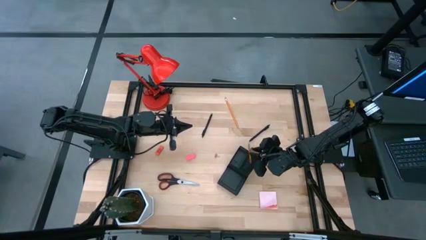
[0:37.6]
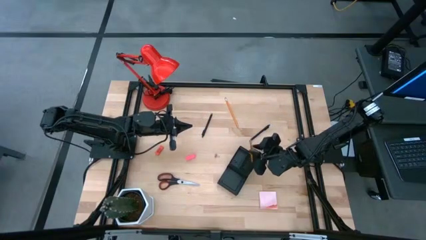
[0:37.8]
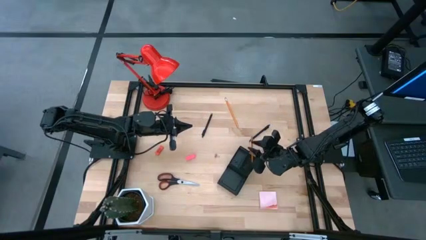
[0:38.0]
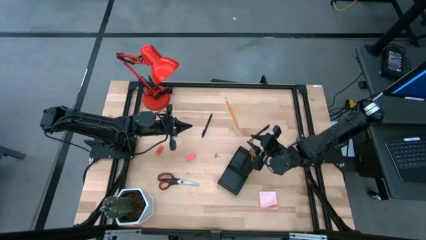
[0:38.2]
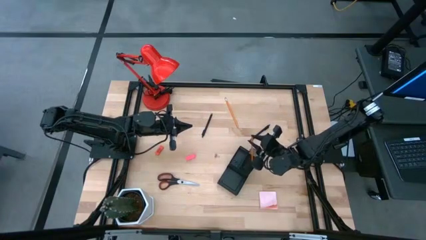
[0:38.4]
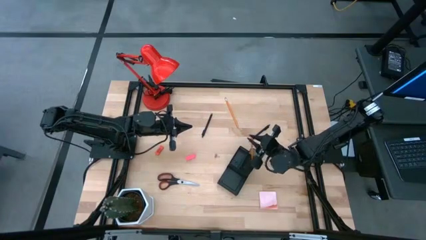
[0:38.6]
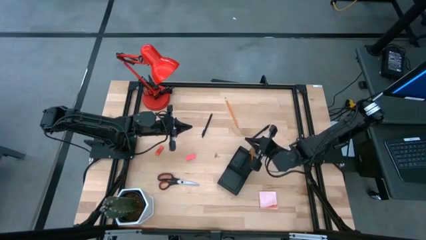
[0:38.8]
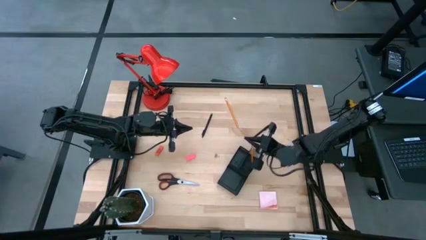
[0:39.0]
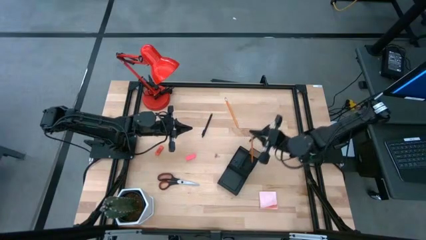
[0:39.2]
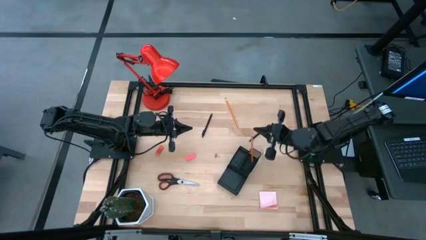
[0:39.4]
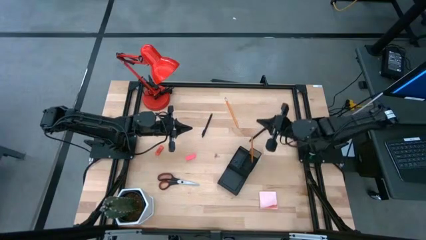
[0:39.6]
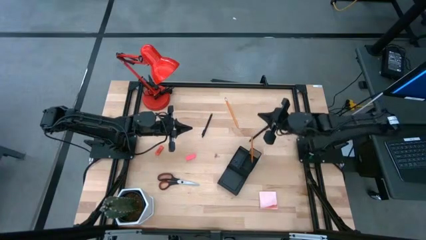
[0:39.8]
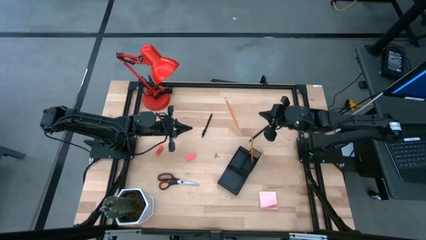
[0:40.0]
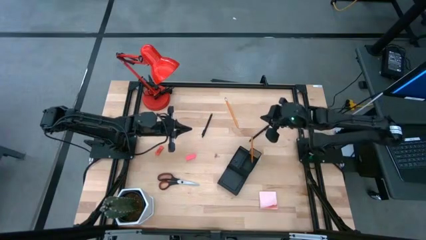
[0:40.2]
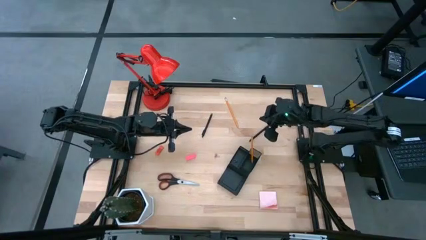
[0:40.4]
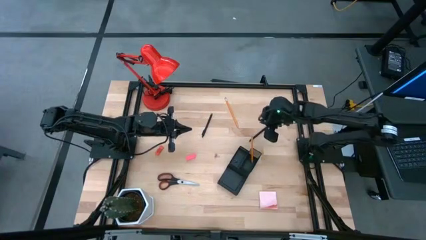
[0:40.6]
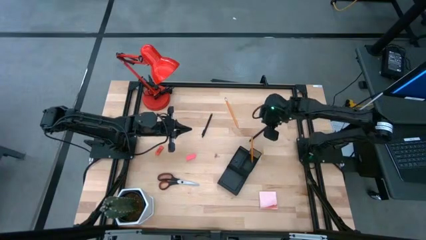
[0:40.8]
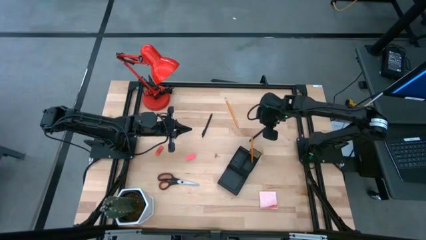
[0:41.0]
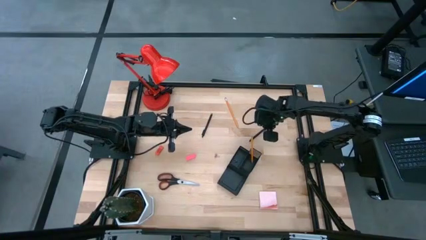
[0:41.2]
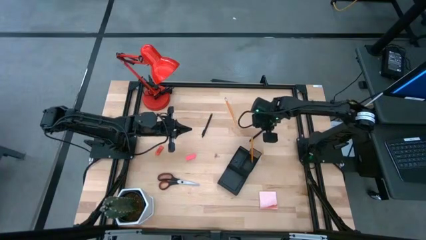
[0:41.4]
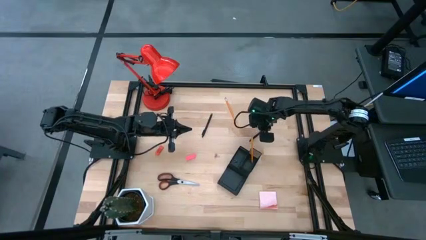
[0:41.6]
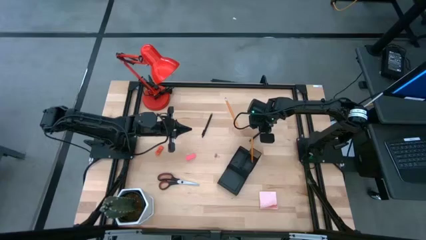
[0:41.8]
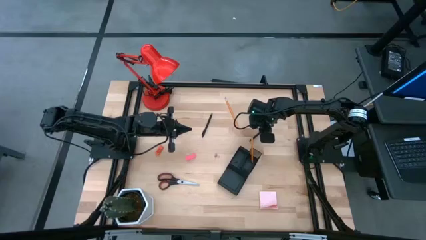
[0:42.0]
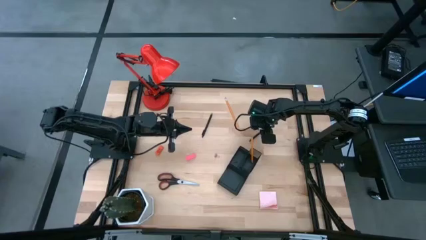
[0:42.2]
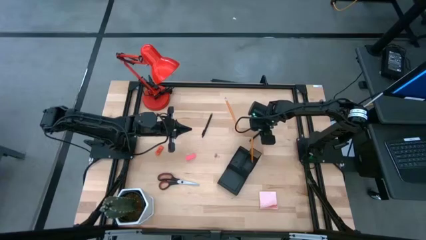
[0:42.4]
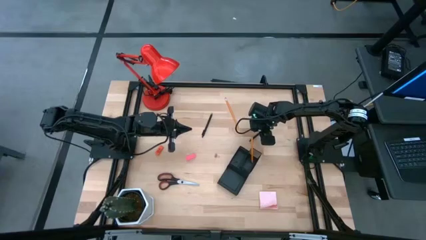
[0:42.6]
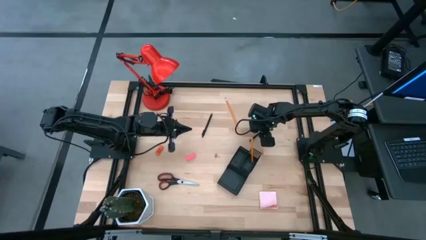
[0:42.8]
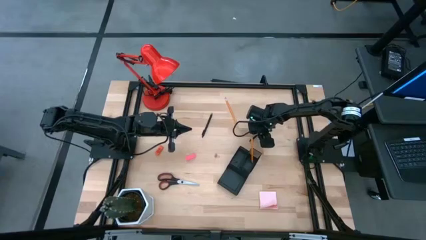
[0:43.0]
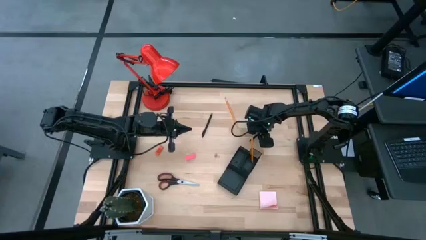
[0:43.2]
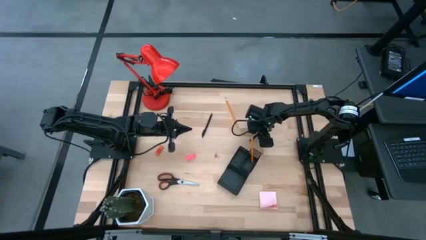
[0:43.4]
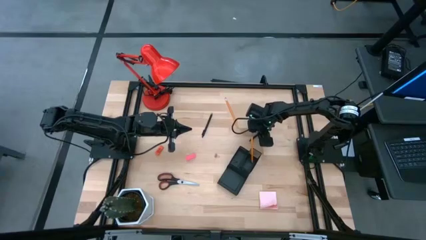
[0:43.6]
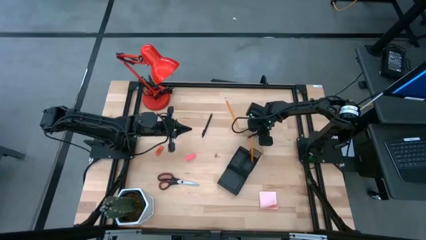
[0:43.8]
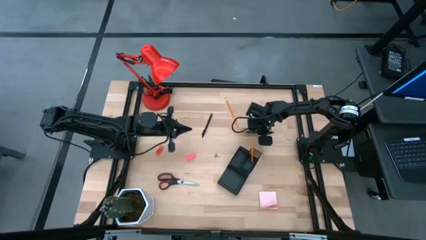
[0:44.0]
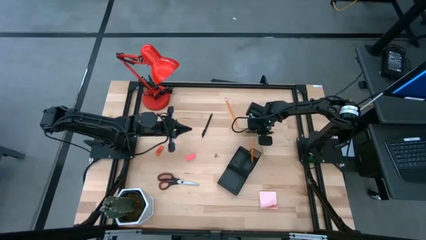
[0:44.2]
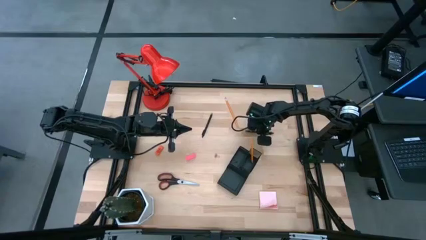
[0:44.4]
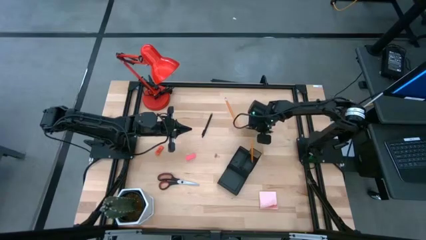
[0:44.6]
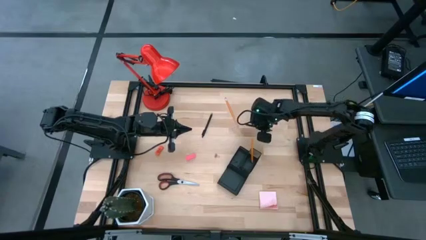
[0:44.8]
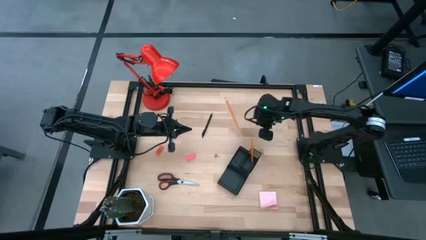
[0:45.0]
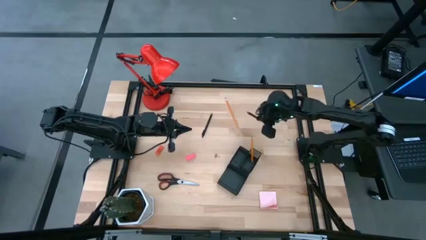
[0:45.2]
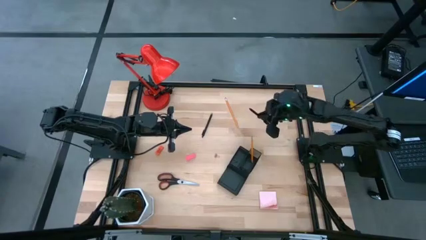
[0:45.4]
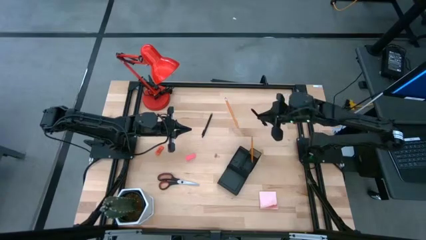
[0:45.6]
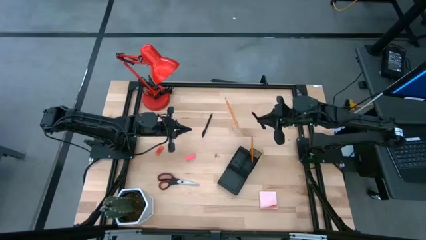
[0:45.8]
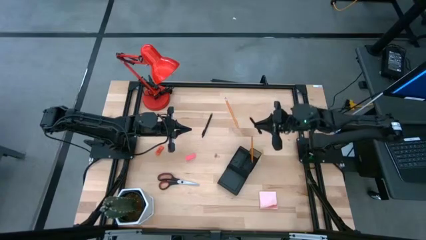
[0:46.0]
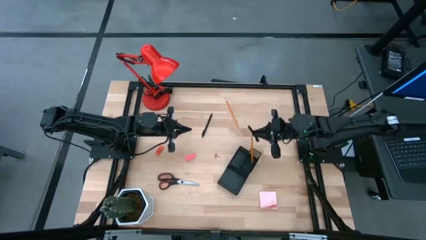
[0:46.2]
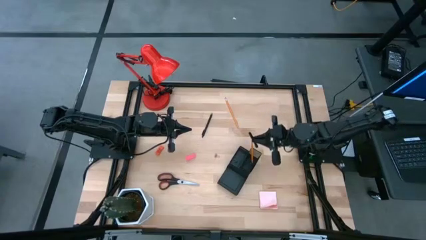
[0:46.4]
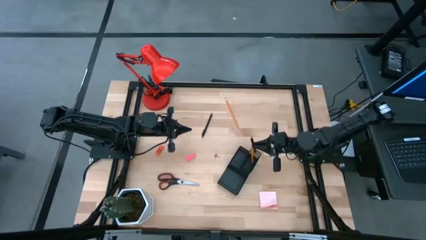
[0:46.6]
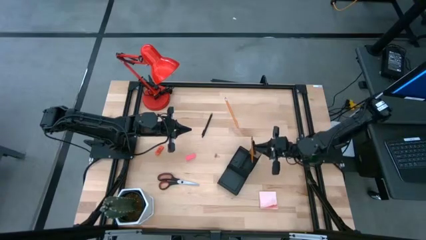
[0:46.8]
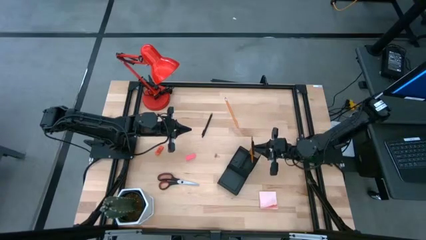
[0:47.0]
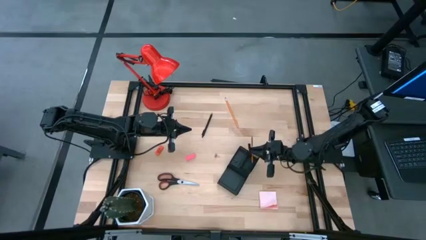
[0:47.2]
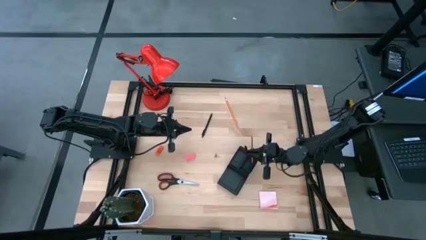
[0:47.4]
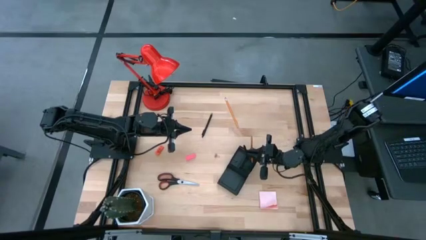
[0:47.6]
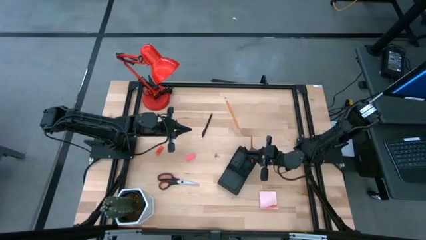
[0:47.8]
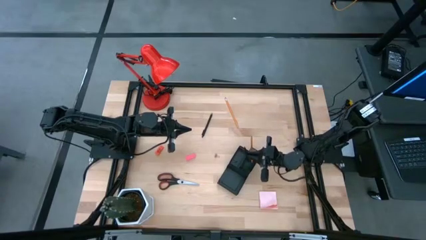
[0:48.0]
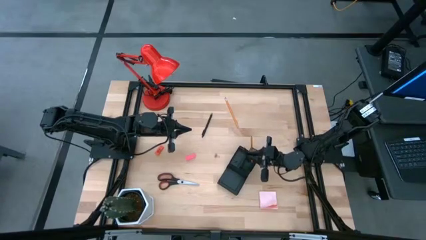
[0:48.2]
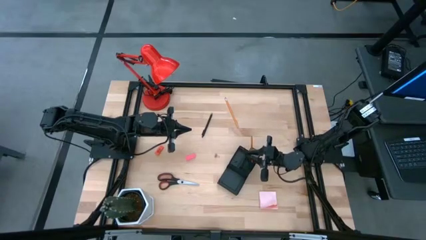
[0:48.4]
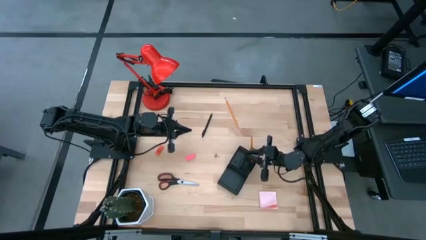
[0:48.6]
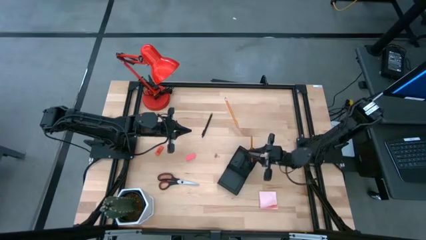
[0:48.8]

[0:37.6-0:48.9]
Task: Pick and place office supplies into organizer
Put the right pen into the desk organizer
